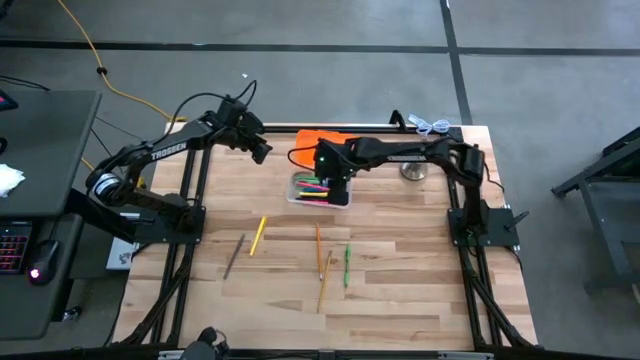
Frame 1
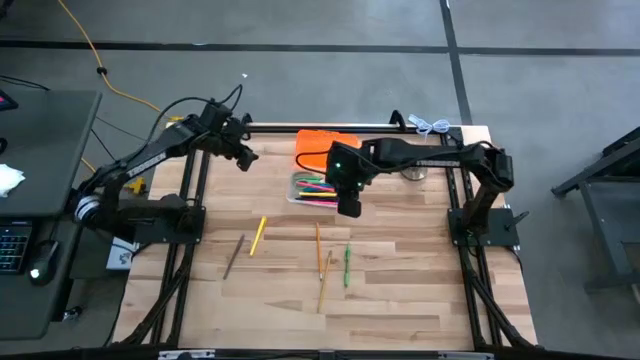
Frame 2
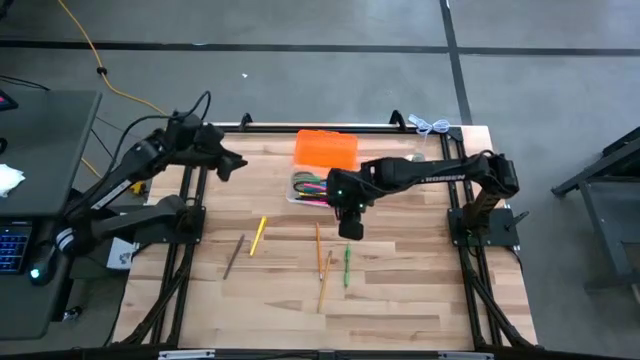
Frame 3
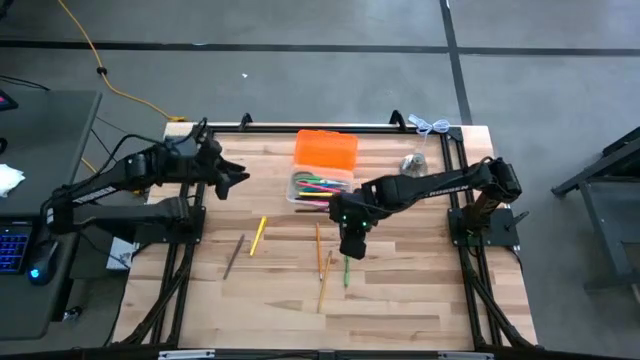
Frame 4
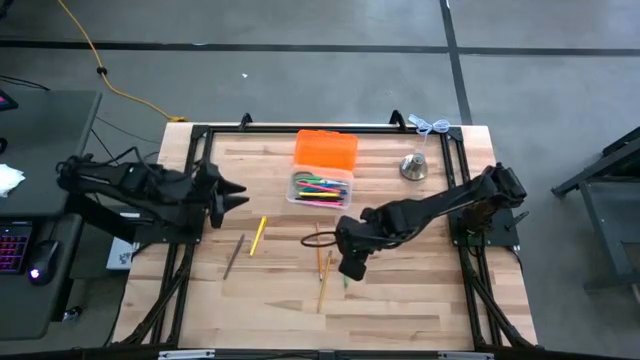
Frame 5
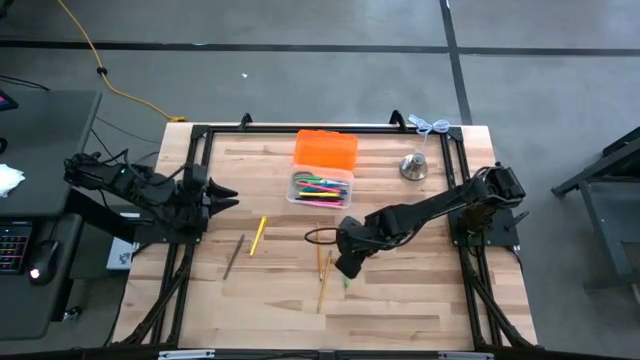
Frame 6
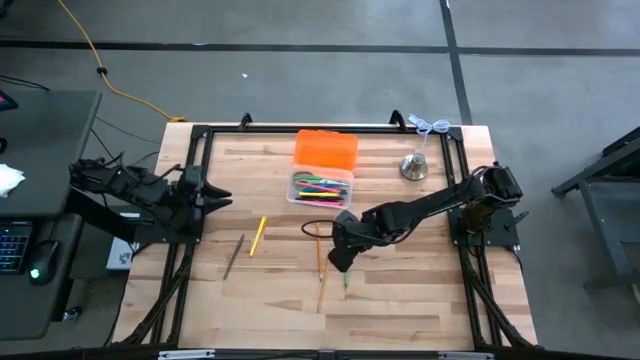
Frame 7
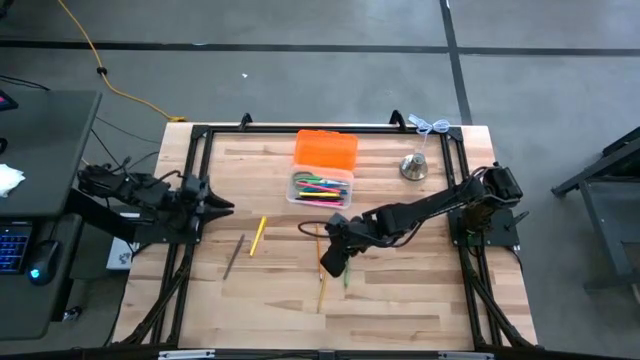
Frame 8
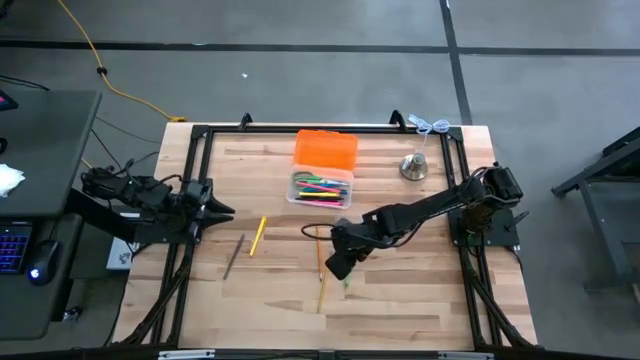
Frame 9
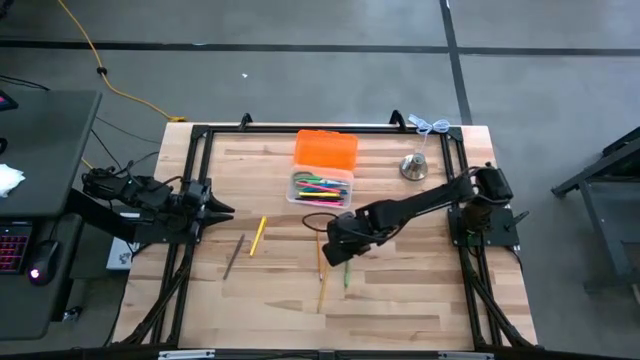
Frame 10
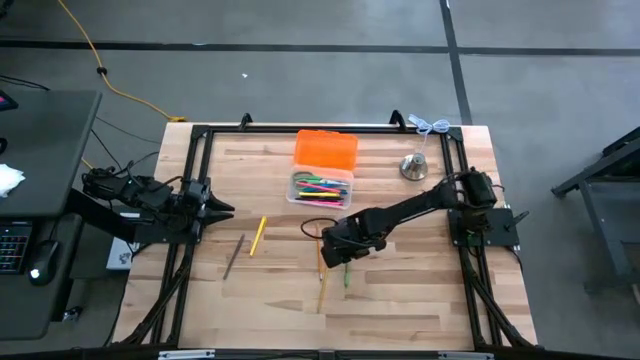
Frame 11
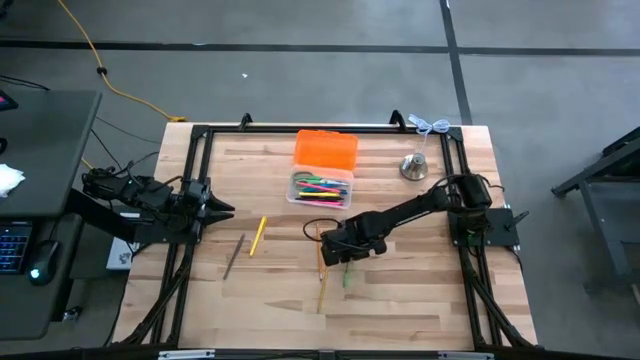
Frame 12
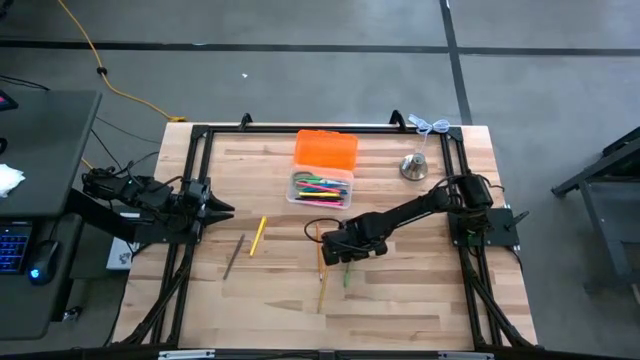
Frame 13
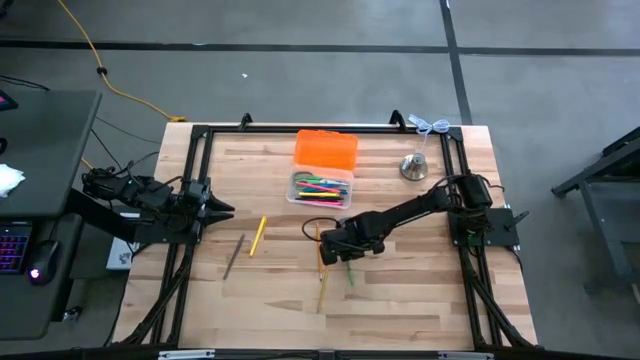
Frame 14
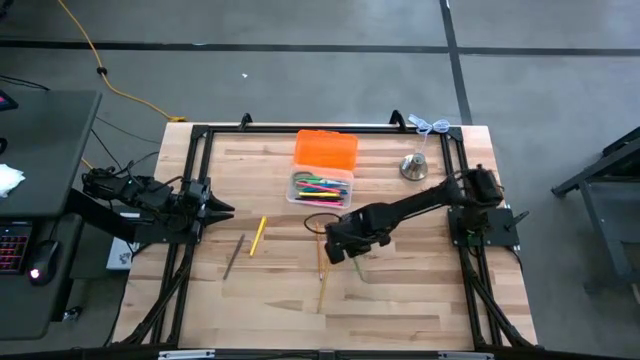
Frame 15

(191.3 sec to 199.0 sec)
Task: Pick & place school supplies into a supply box
Put the green pen into the transparent supply box

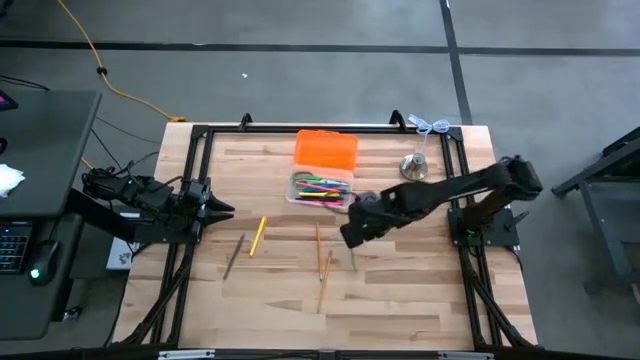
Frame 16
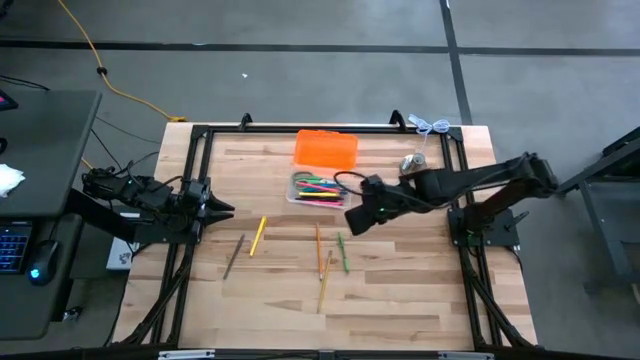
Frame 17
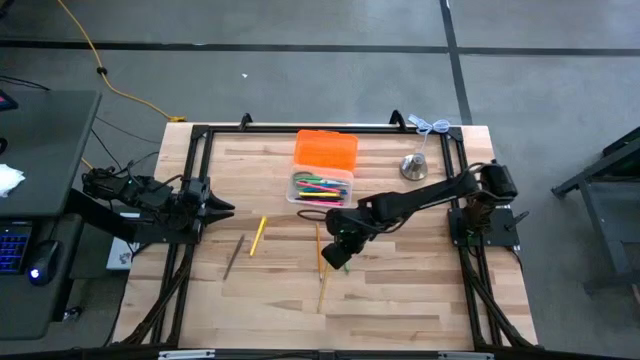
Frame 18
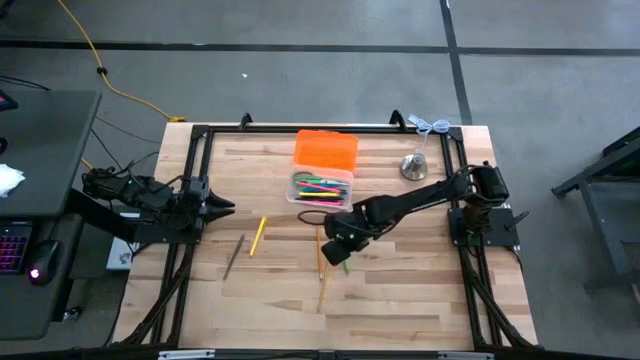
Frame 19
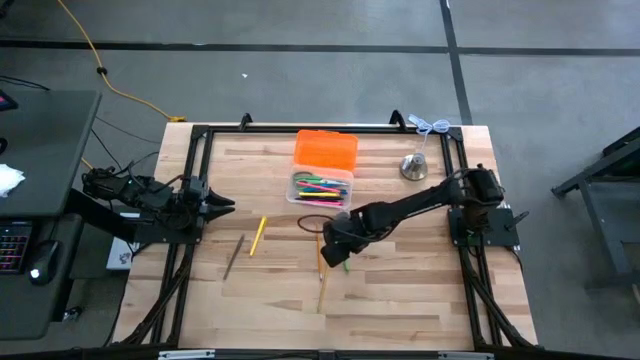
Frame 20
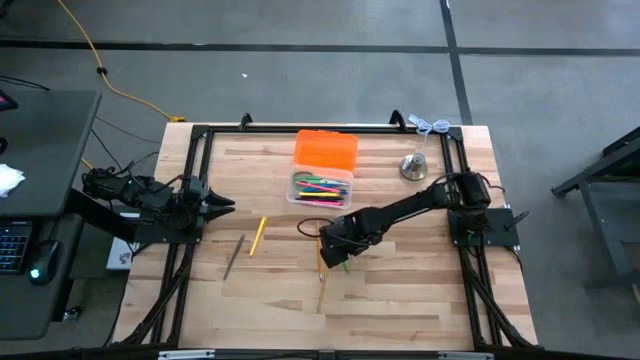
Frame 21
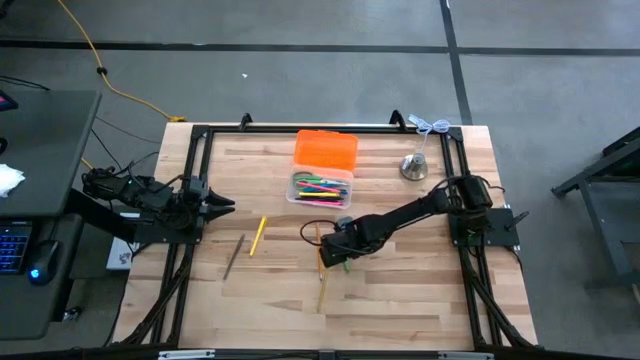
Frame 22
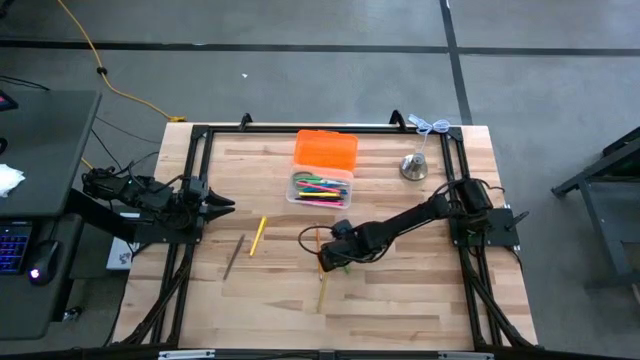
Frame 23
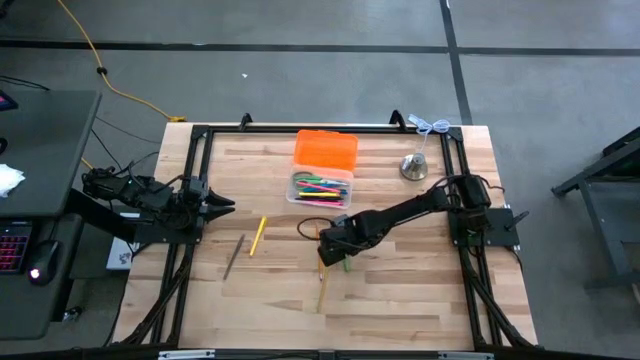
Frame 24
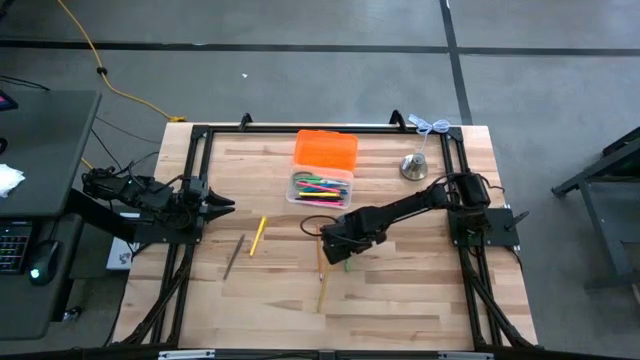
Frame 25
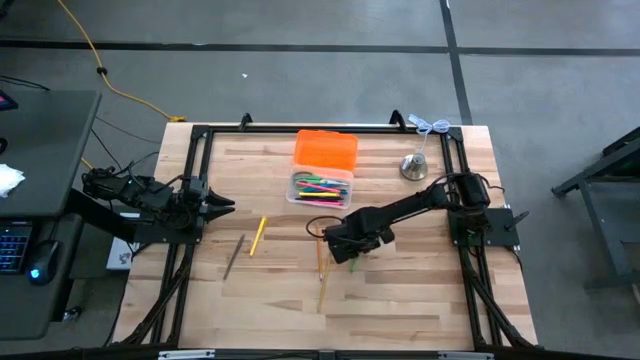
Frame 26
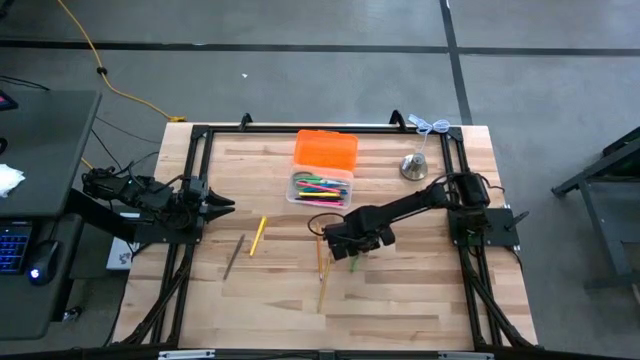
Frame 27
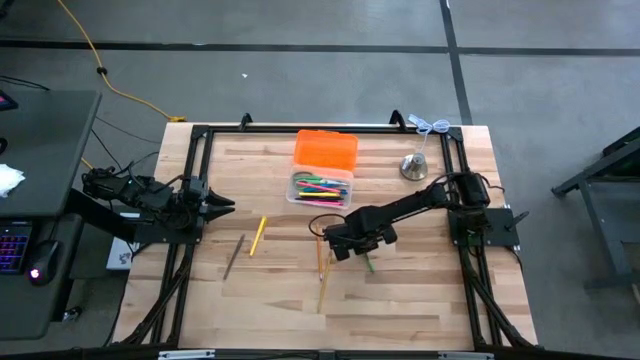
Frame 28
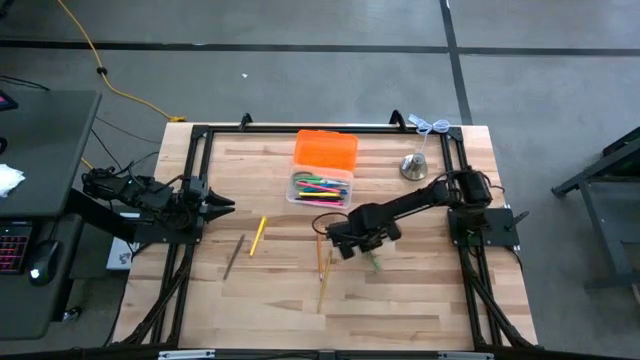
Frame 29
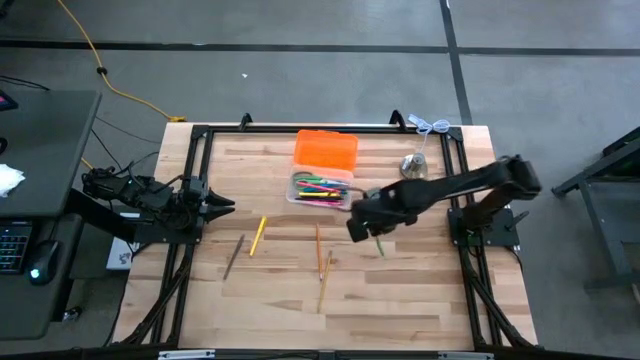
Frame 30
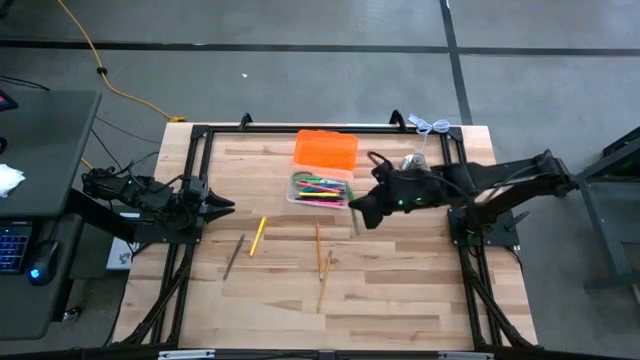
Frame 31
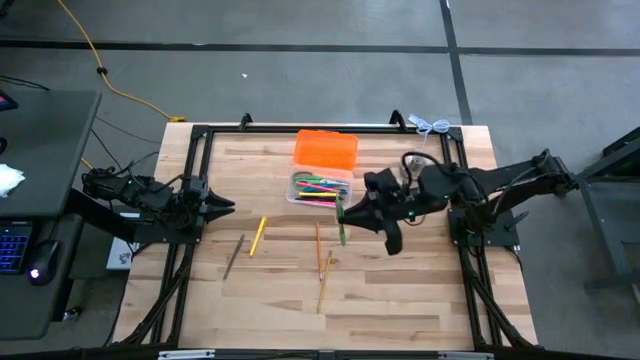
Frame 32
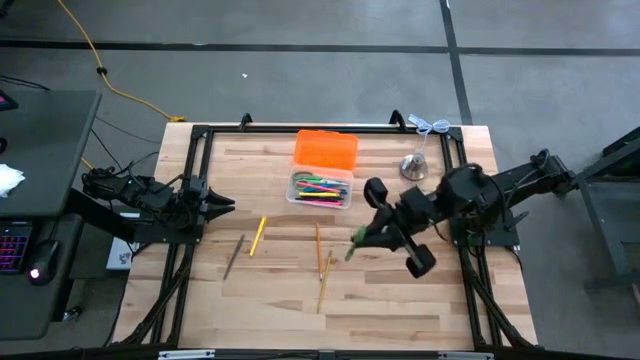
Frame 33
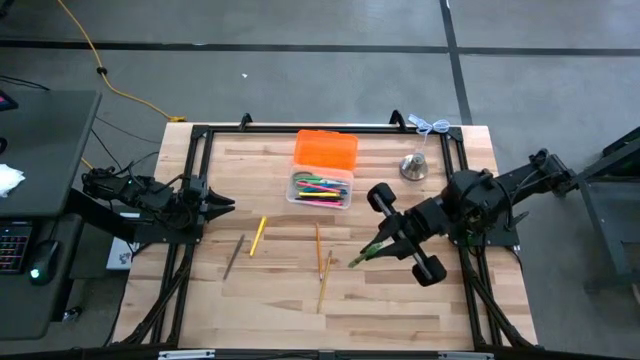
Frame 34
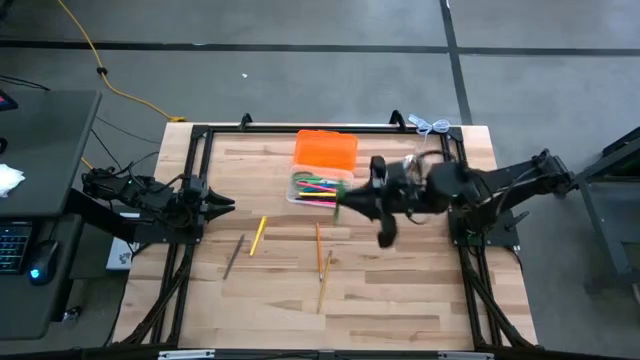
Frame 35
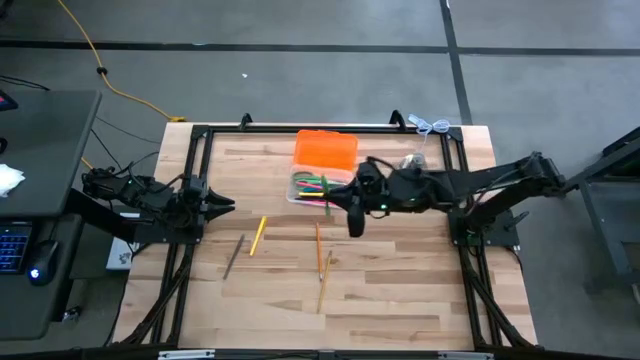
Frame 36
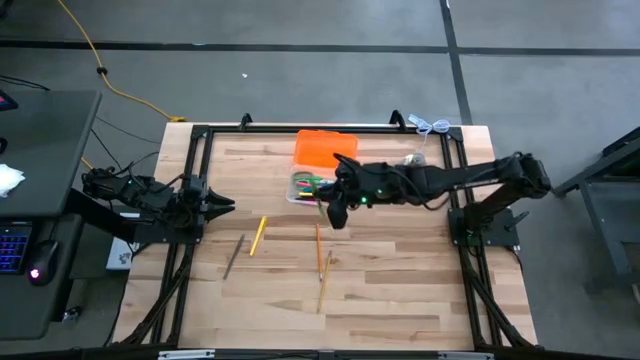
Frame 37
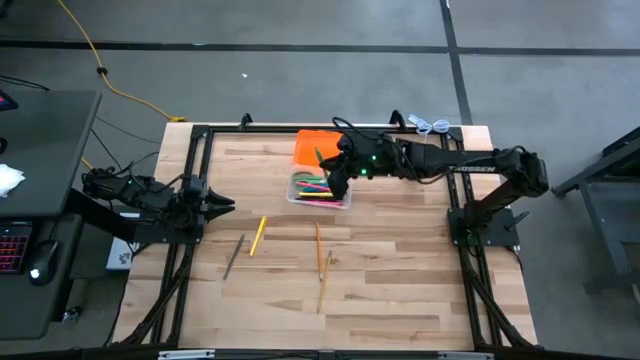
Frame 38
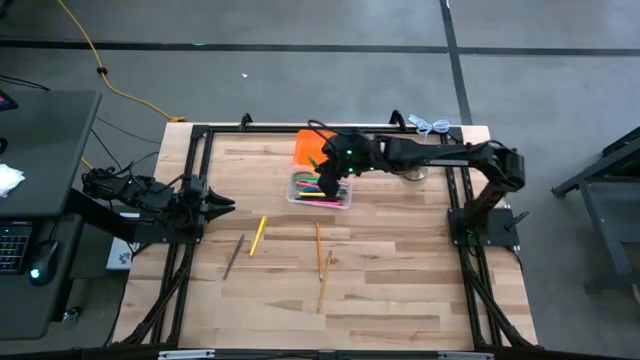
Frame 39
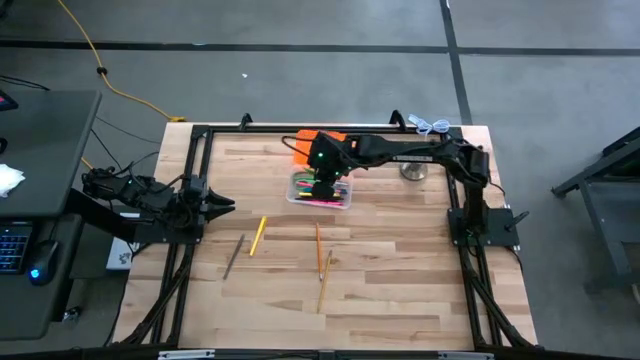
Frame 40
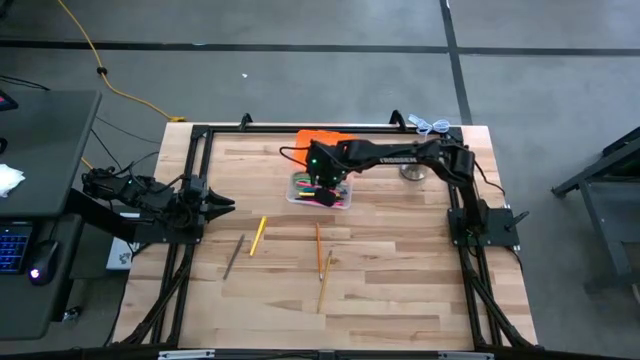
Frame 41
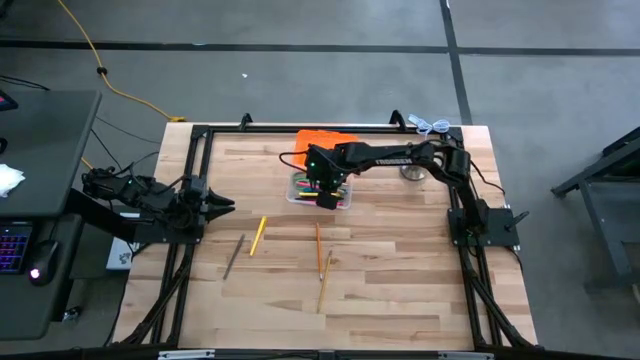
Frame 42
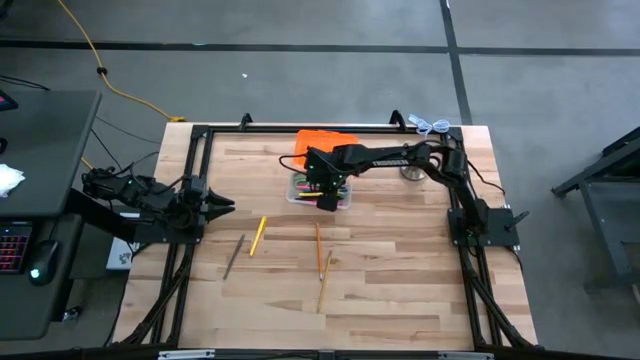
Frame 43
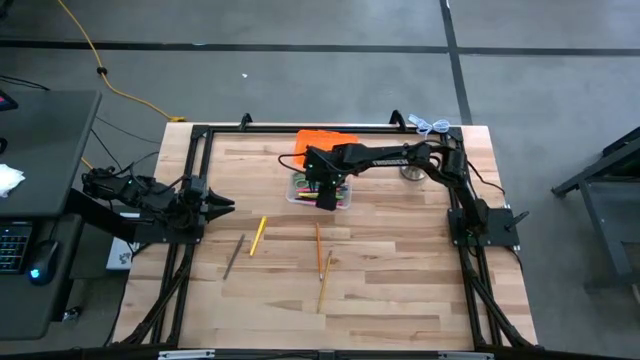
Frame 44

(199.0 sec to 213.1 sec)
Put the green pen into the transparent supply box
